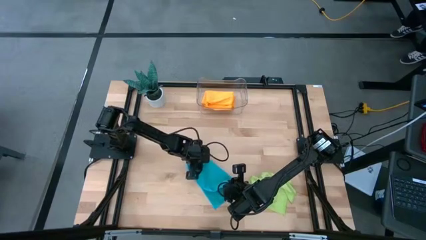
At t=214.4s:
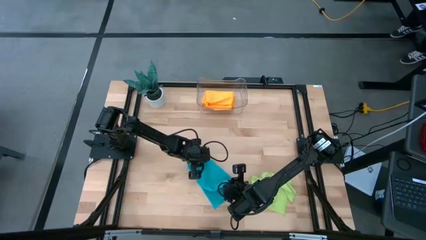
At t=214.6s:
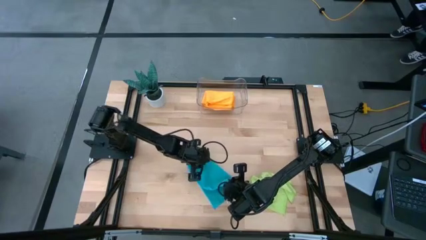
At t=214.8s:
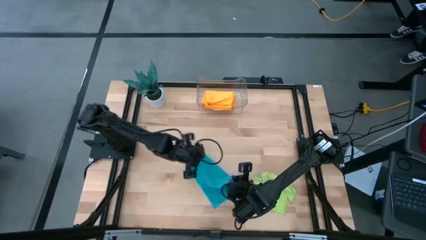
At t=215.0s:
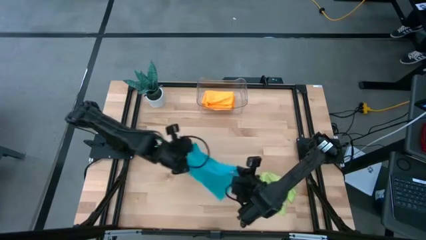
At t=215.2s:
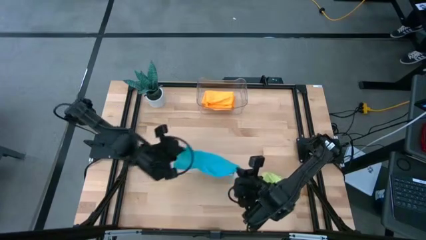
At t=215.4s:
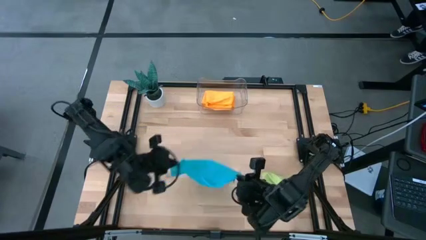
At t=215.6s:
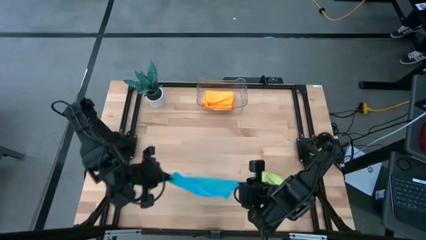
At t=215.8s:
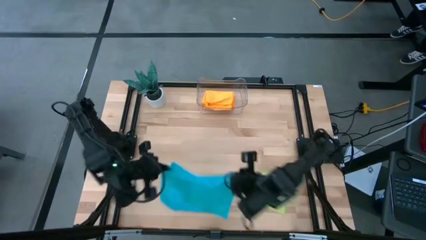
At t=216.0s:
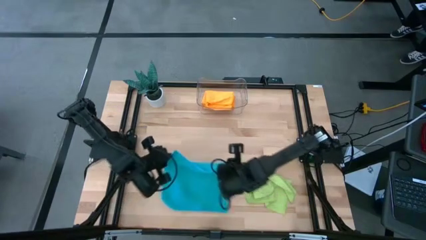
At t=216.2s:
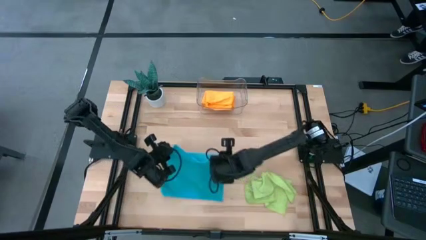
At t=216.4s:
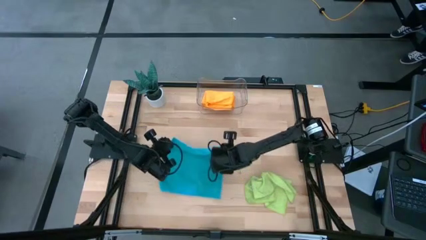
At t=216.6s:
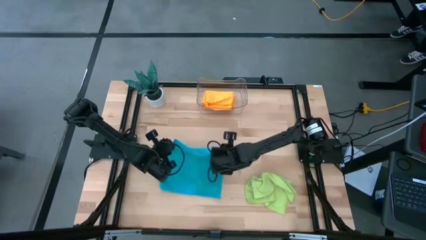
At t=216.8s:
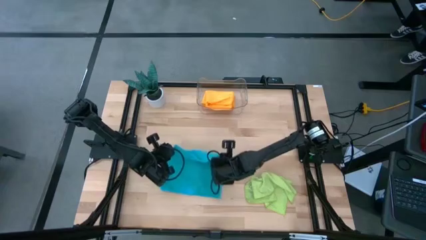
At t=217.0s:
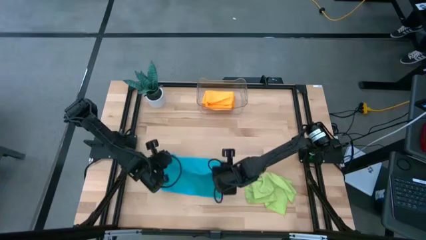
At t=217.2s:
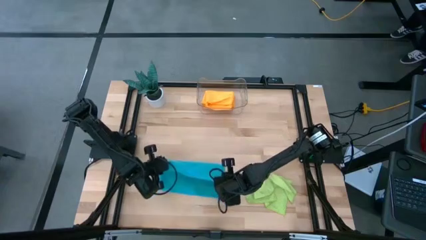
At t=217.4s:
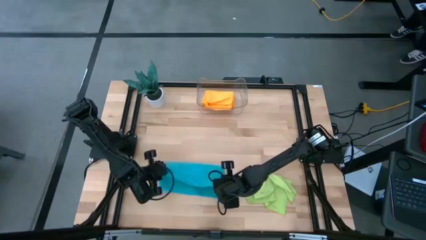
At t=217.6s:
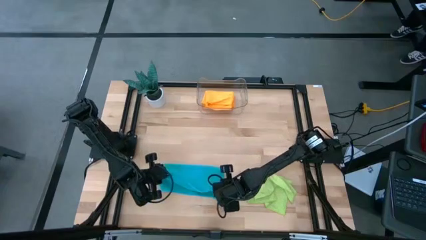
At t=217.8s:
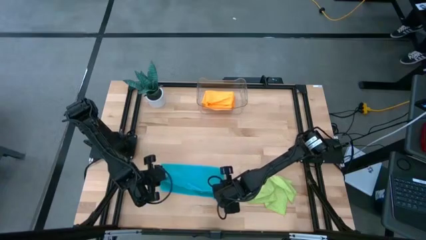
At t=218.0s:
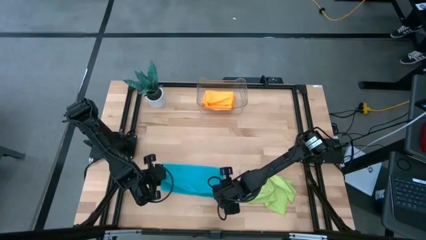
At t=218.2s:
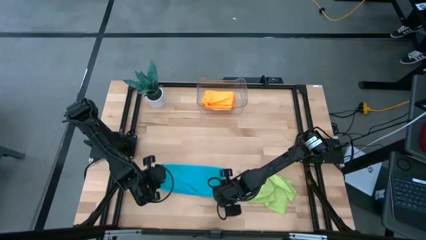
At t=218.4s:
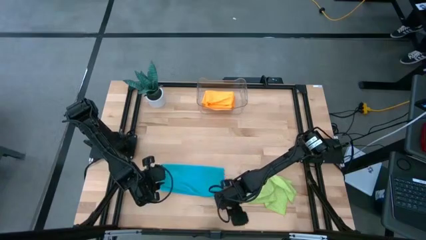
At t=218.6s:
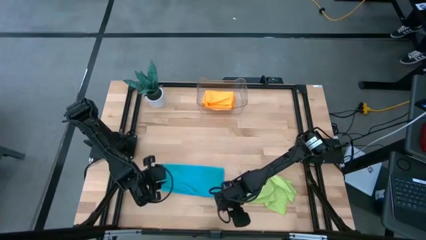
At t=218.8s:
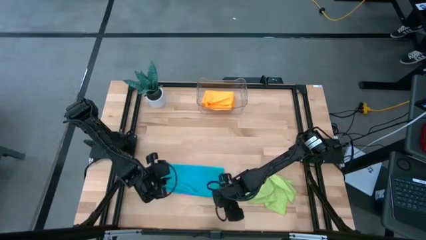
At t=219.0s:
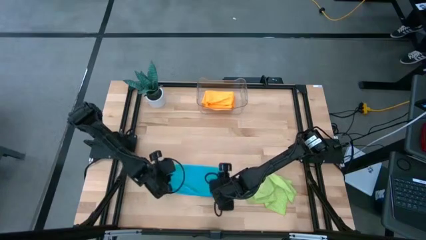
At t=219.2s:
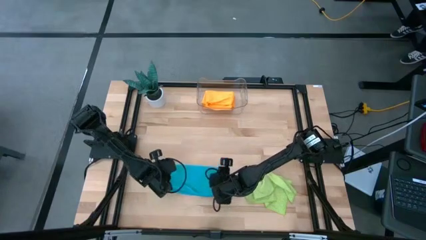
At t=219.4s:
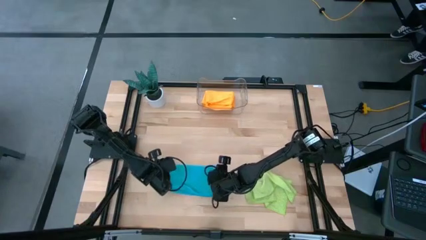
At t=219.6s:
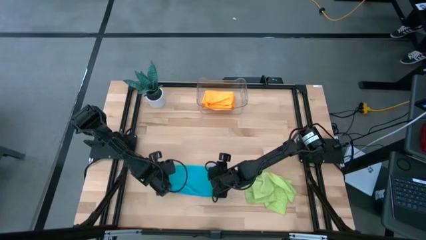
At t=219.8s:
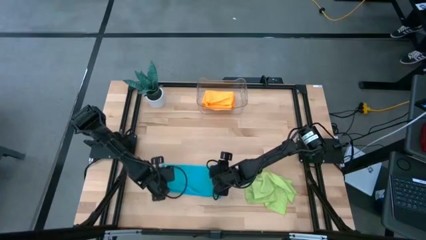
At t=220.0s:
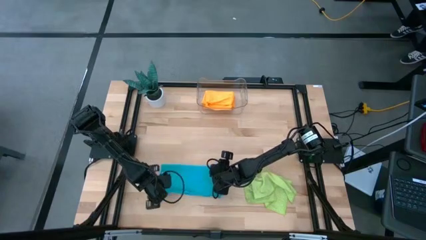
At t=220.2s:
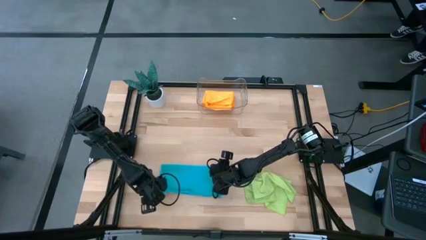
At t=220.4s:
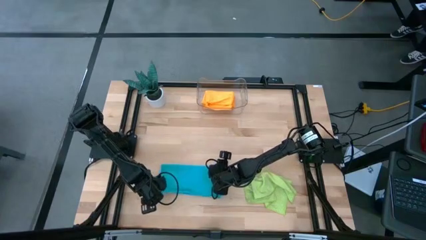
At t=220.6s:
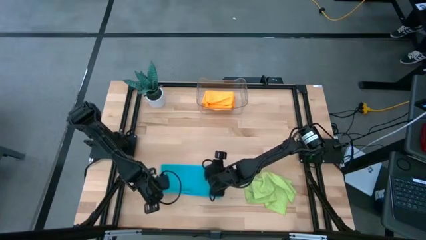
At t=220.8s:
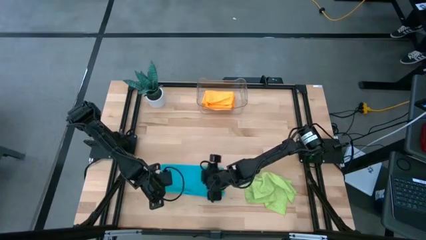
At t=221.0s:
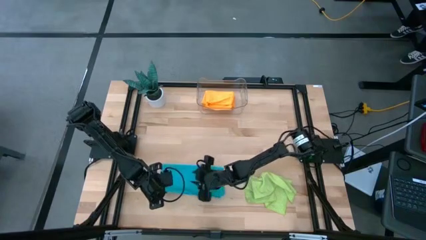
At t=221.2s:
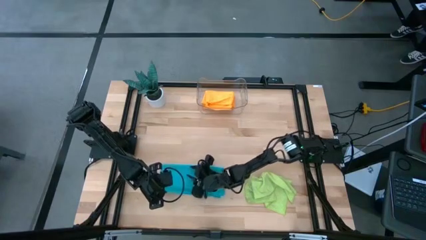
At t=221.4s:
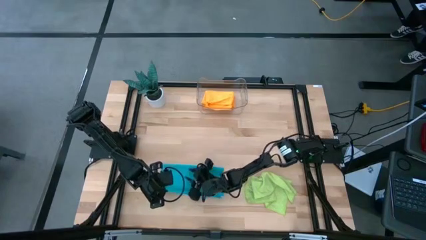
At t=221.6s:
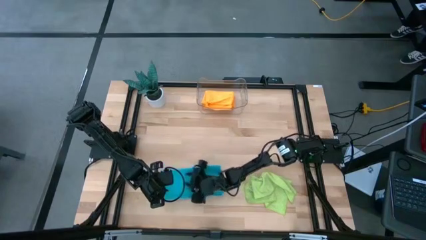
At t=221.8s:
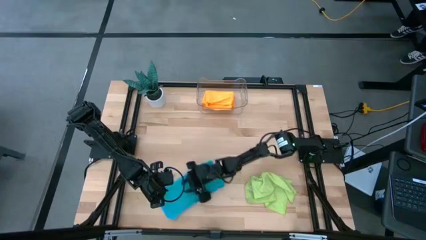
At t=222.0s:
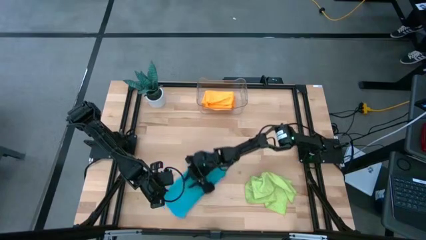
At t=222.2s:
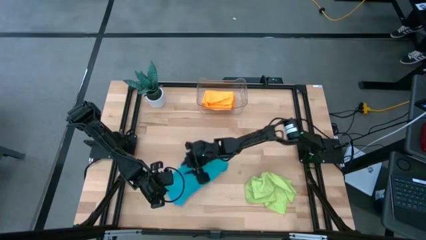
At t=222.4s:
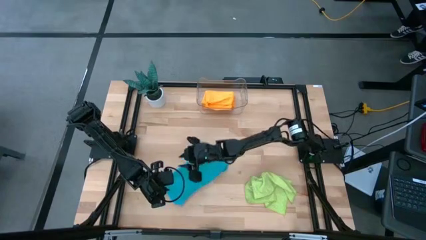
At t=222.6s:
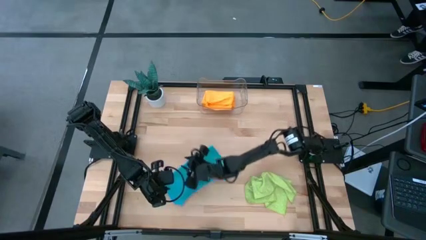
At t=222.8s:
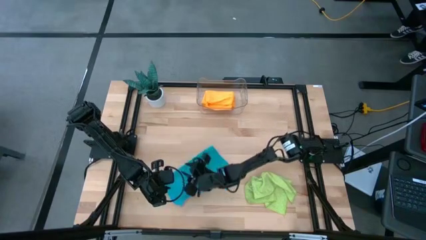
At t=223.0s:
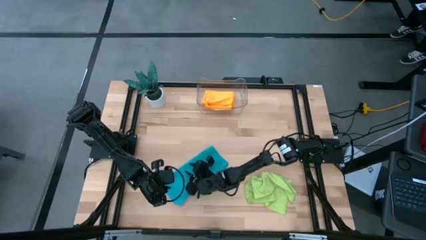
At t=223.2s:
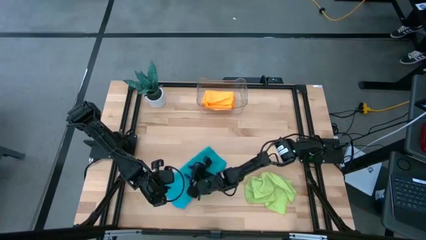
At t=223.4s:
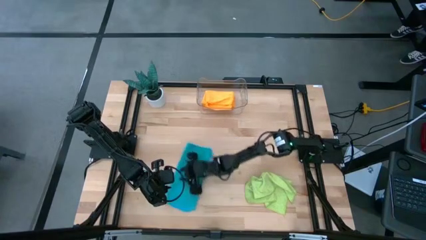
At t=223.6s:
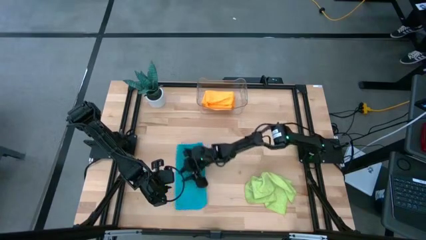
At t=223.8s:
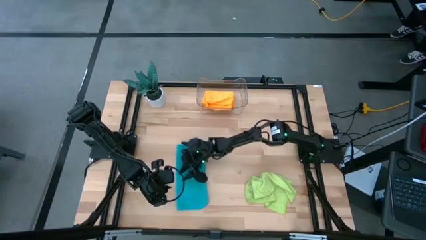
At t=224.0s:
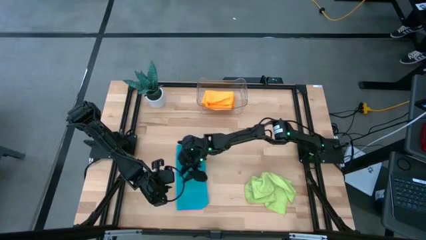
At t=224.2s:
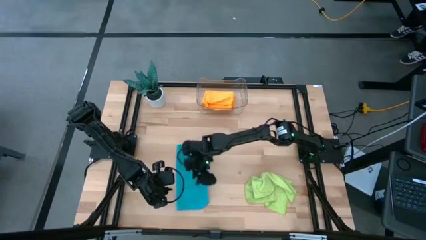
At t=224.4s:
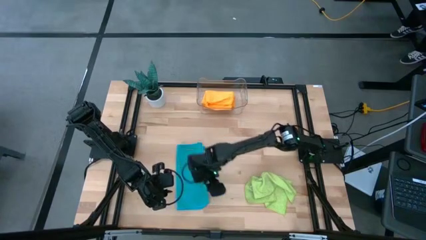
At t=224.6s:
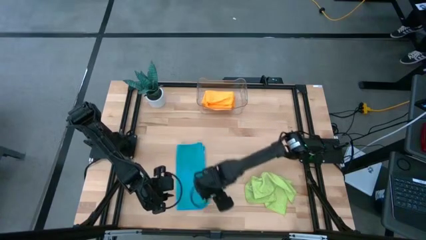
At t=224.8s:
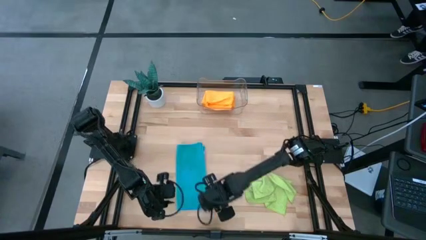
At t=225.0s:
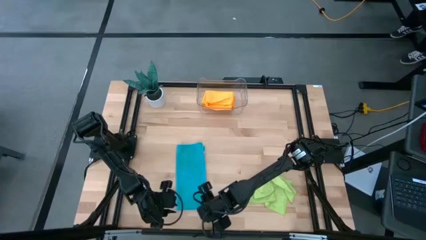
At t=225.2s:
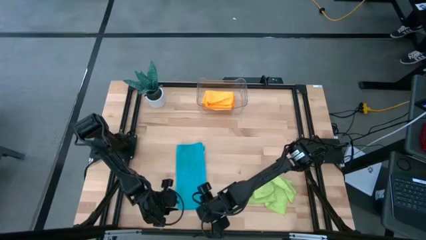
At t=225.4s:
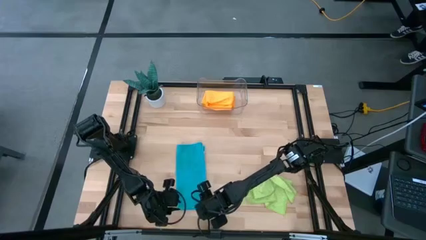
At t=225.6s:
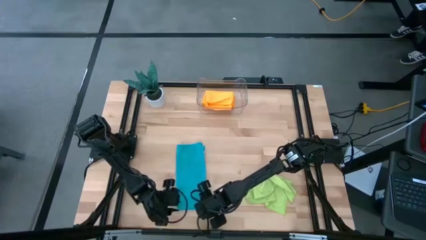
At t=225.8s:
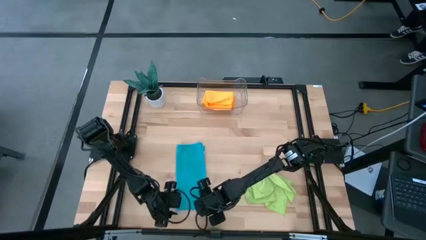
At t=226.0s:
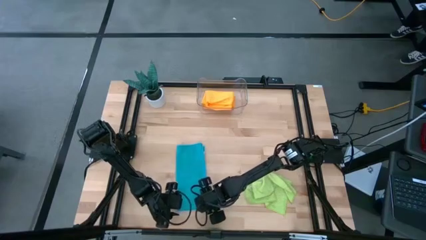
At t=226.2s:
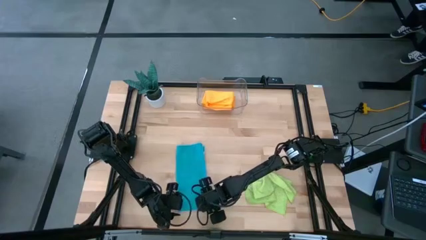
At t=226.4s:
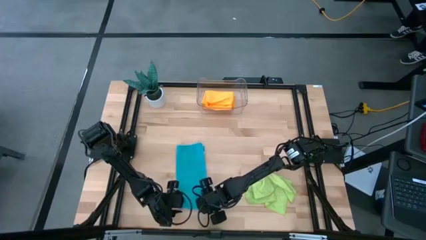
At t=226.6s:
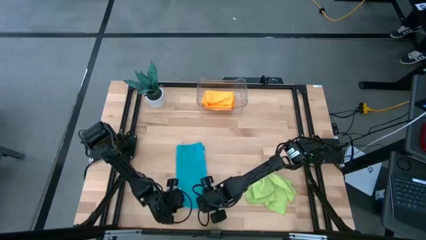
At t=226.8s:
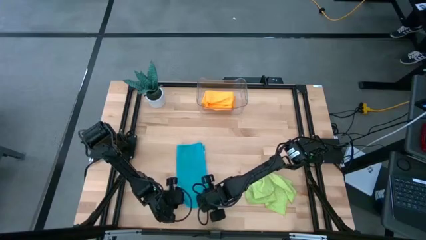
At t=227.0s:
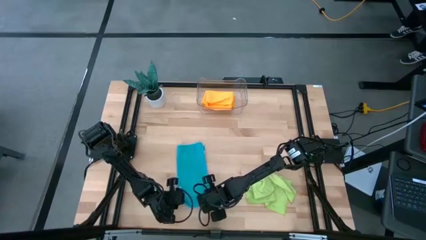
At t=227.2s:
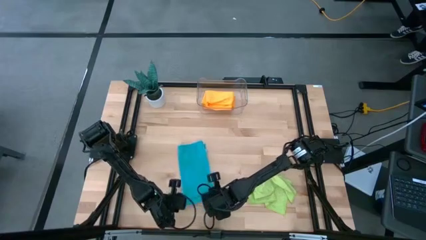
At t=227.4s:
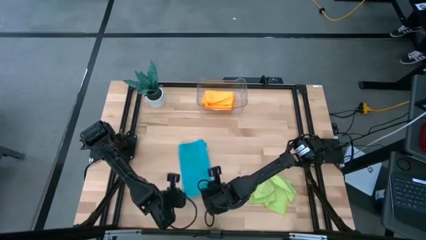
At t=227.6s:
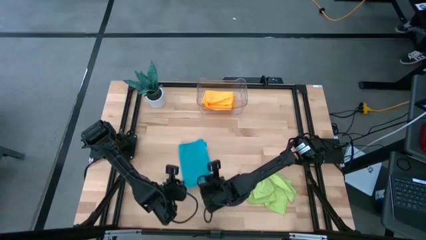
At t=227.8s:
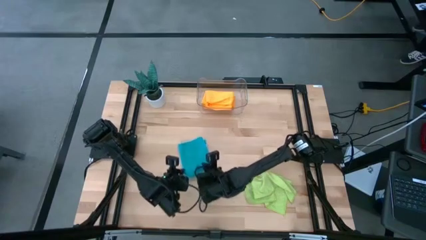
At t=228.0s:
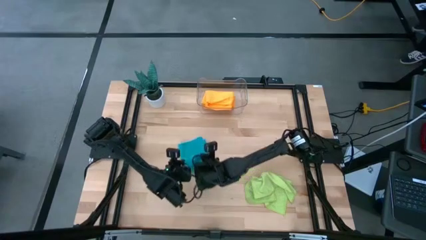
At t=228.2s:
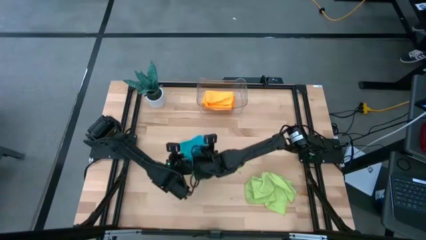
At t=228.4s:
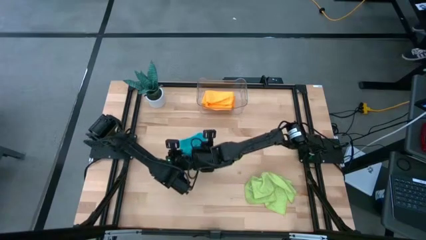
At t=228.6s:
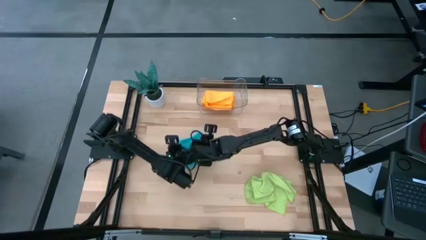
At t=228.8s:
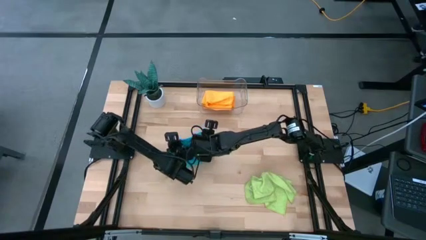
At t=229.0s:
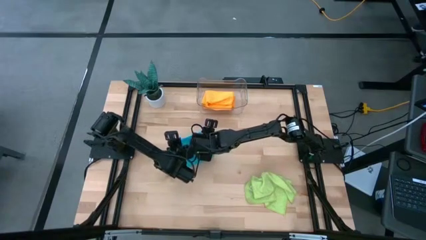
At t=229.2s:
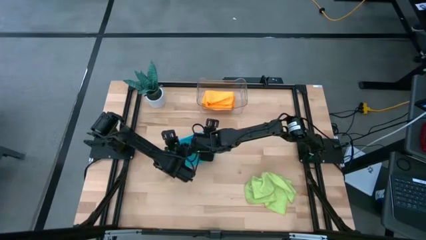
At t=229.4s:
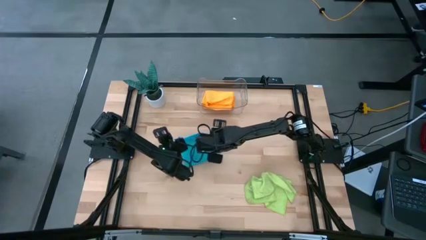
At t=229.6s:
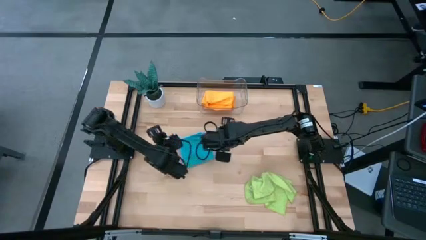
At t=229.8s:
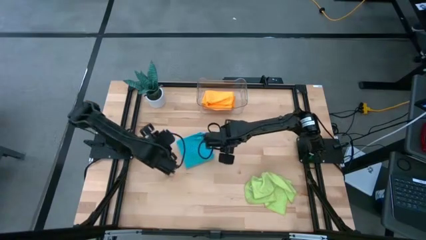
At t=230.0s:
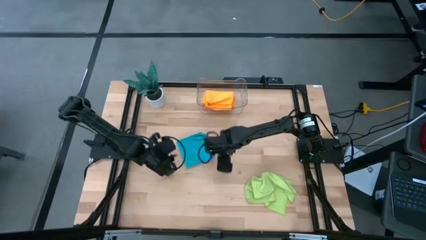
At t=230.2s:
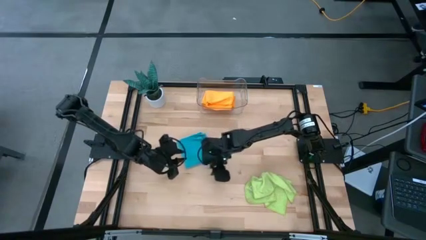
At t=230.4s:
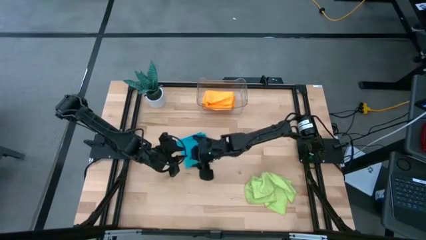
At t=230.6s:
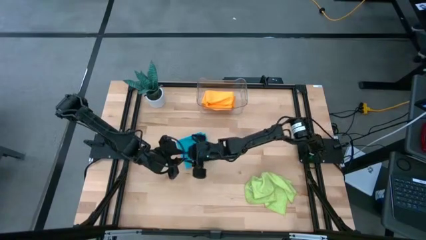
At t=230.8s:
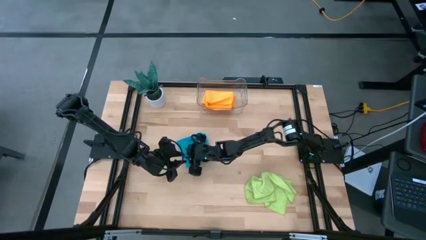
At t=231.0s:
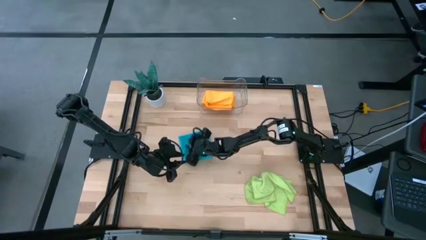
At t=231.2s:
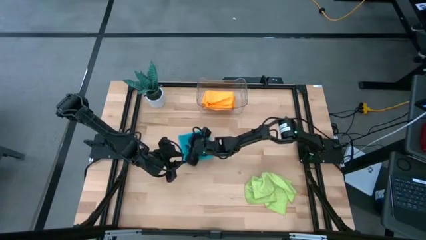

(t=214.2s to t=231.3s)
Task: Fold microfiber towels
Fold the blue microfiber towel
